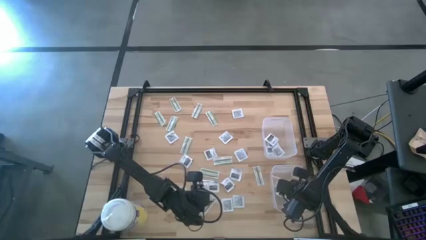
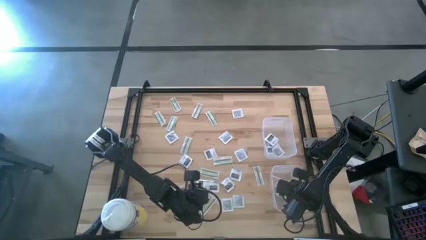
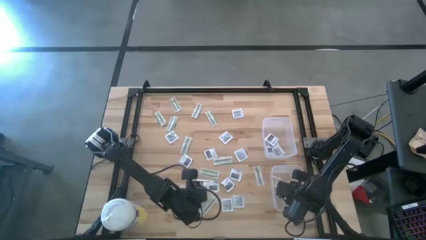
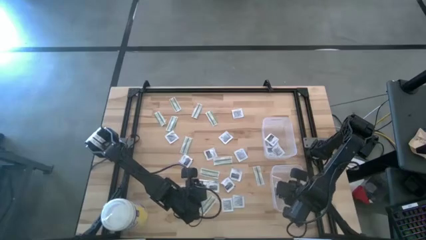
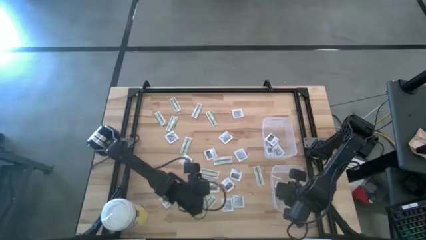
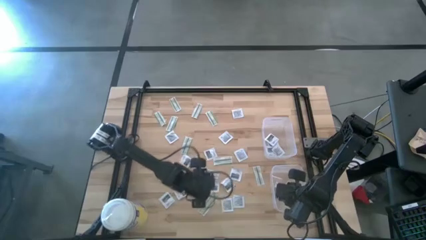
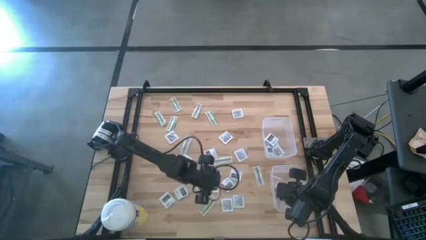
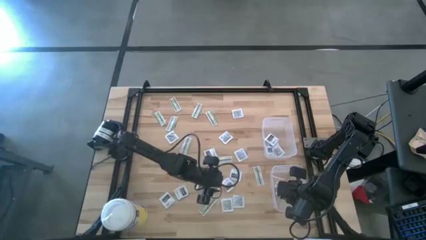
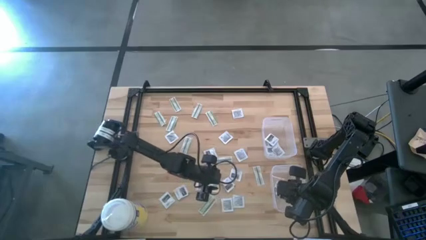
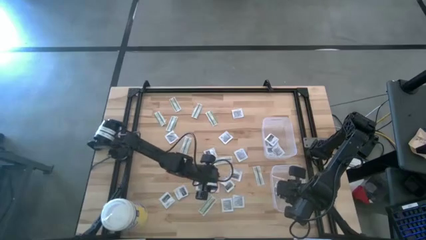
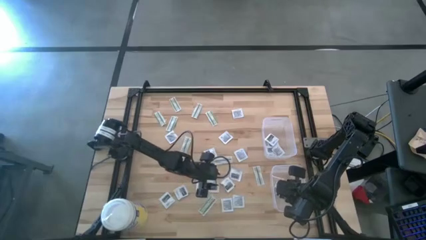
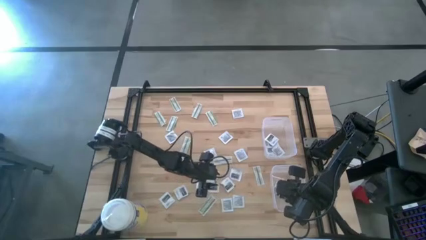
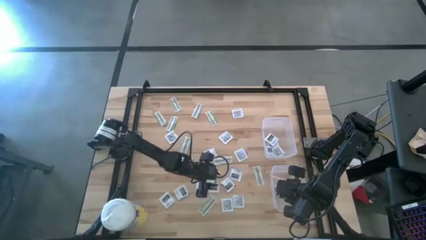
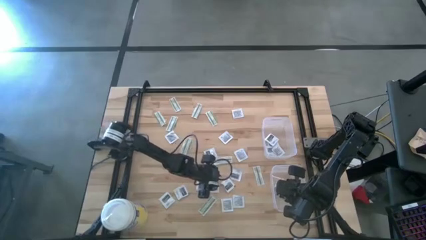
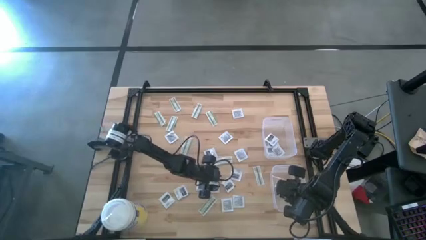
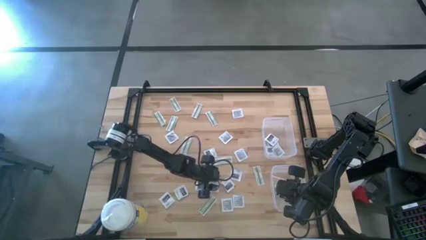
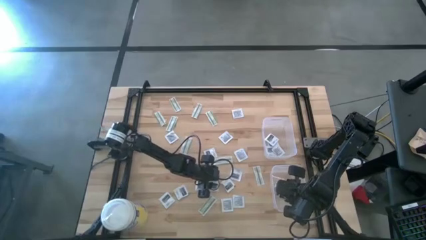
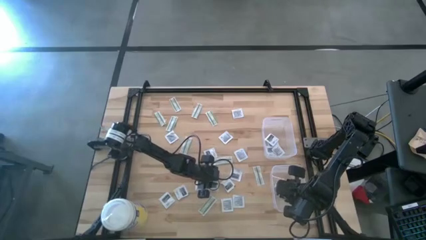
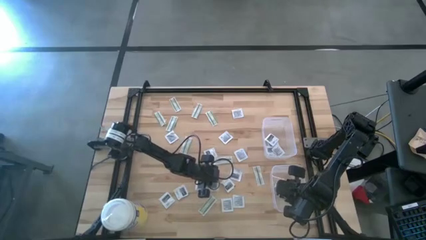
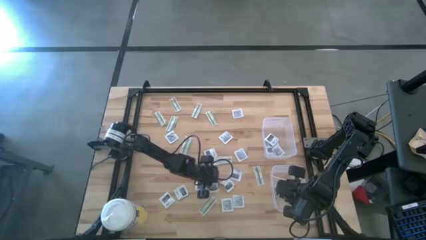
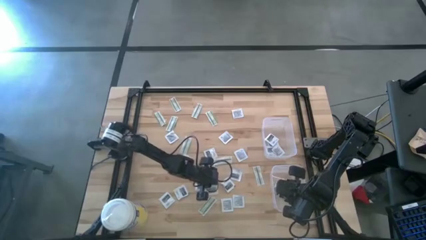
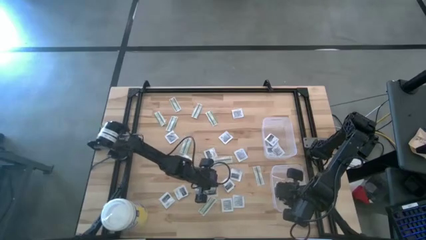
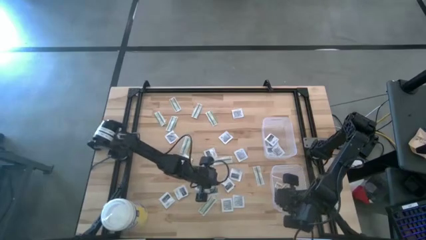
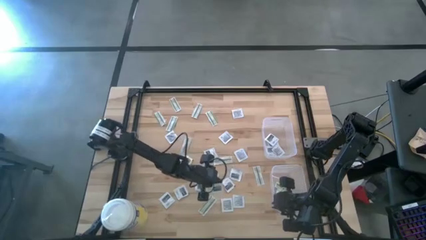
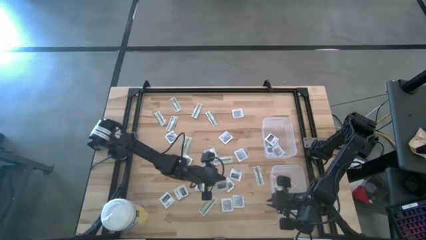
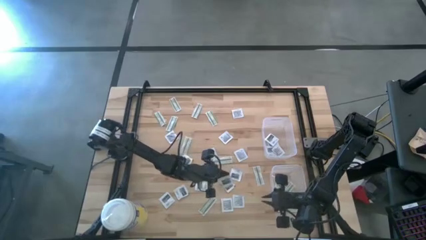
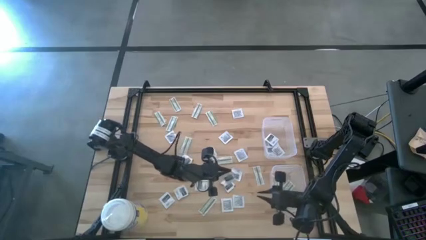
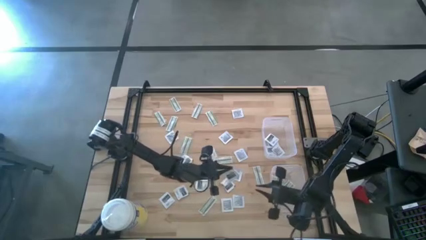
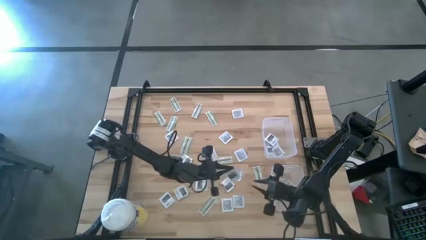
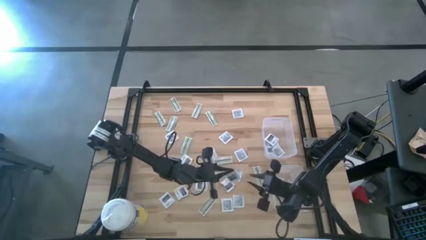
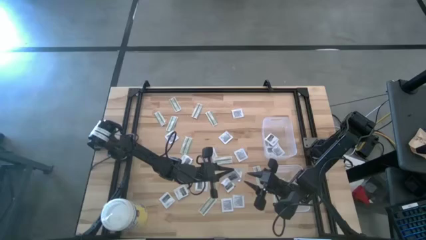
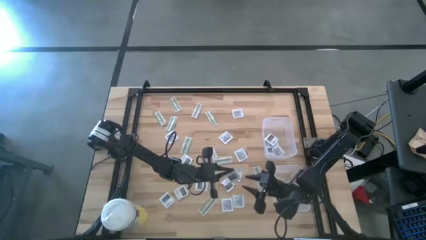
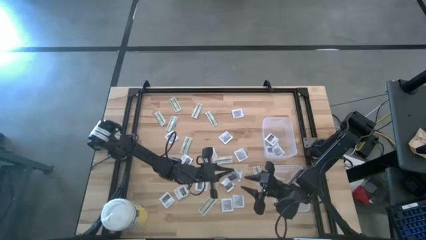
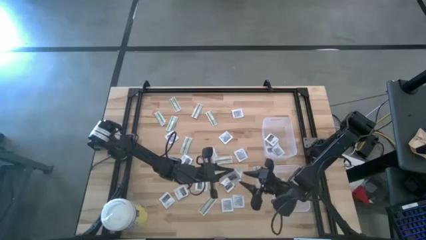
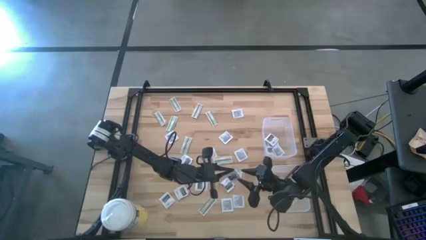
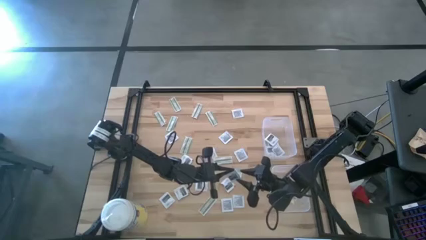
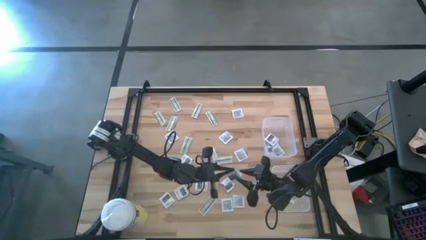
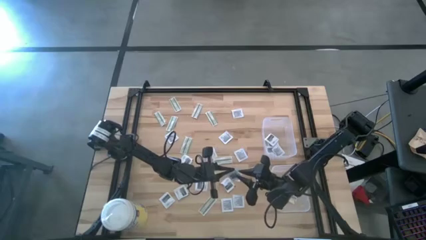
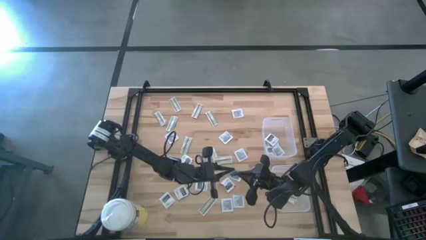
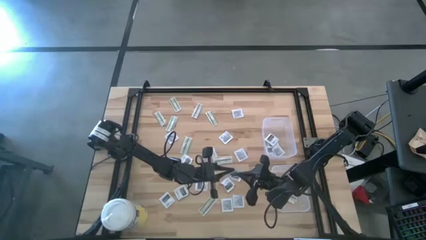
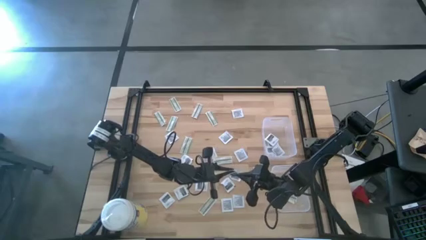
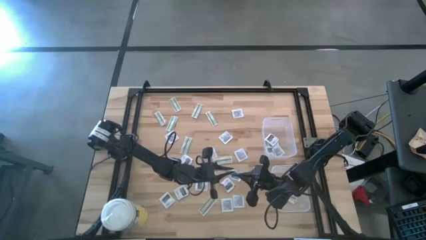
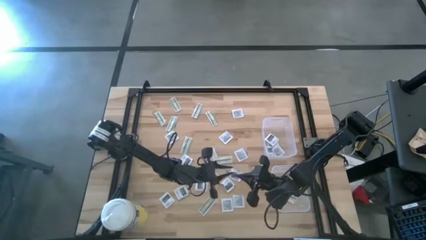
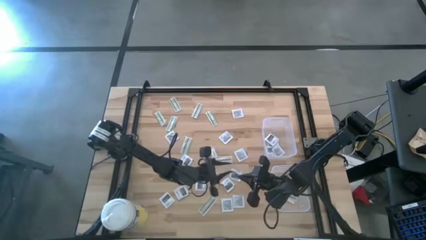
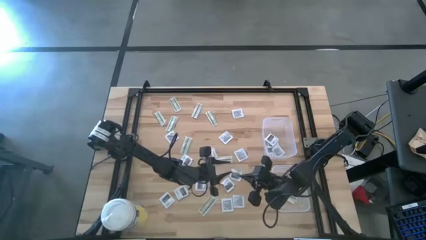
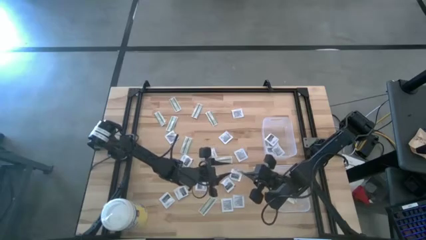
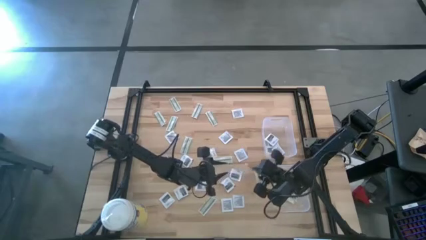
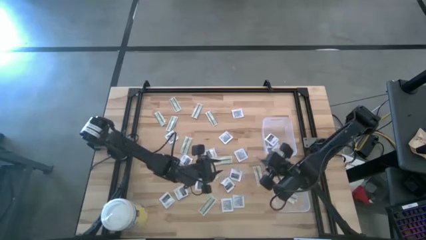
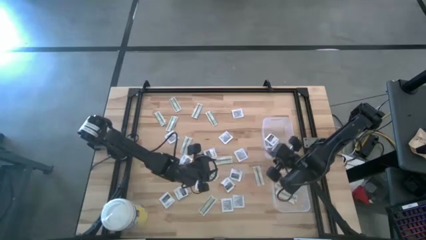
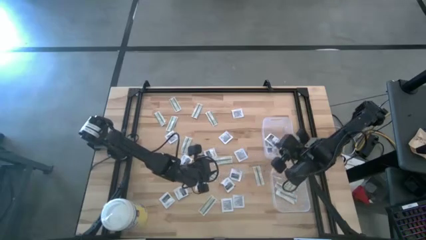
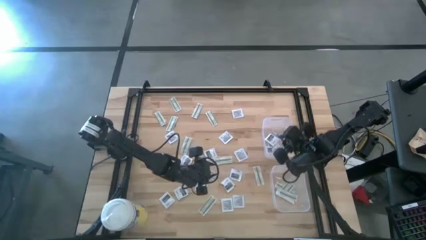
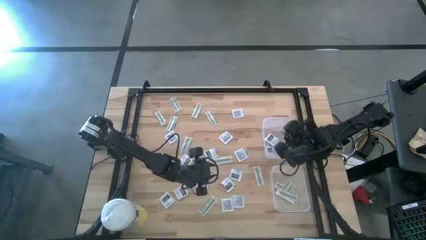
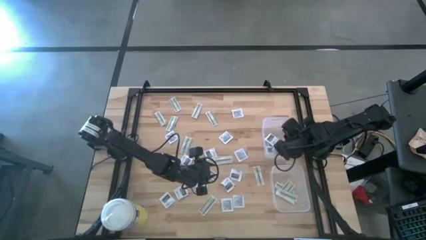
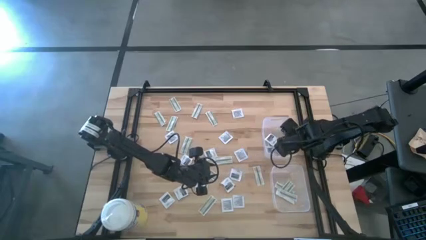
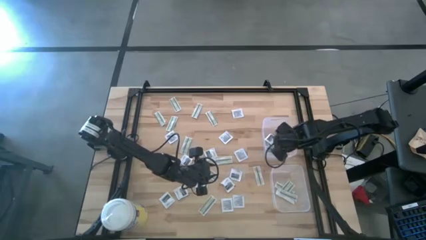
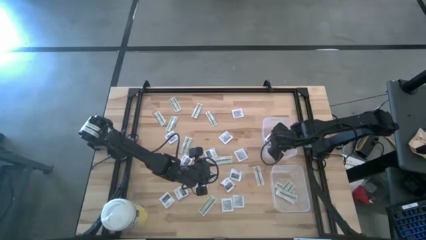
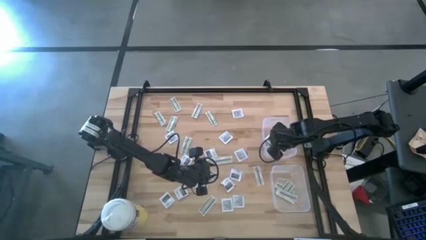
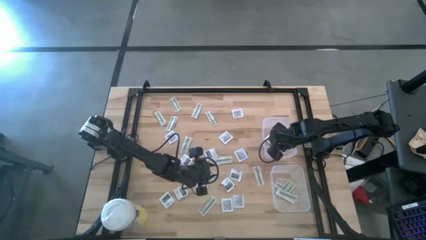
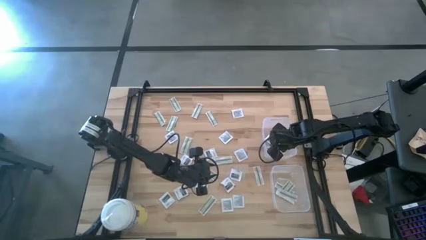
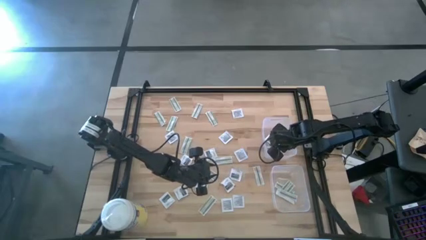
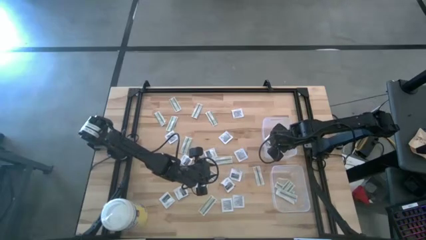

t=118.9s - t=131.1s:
Task: Pick & Place First Aid Supplies
Put the towelette pack into the top bin
